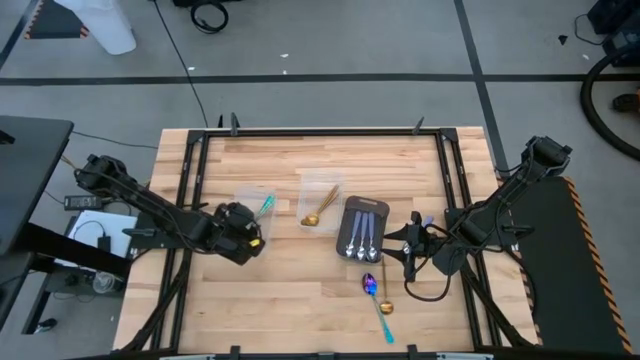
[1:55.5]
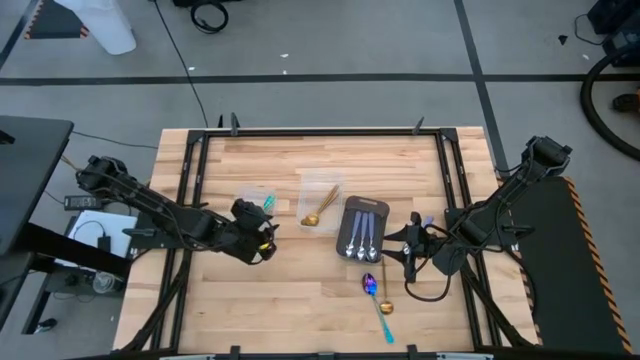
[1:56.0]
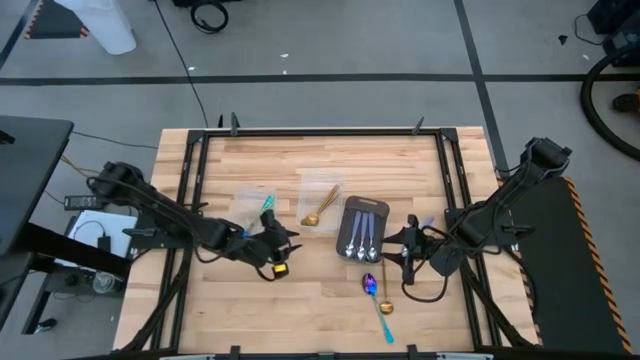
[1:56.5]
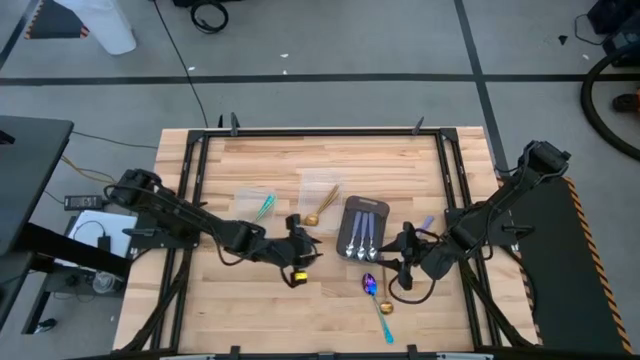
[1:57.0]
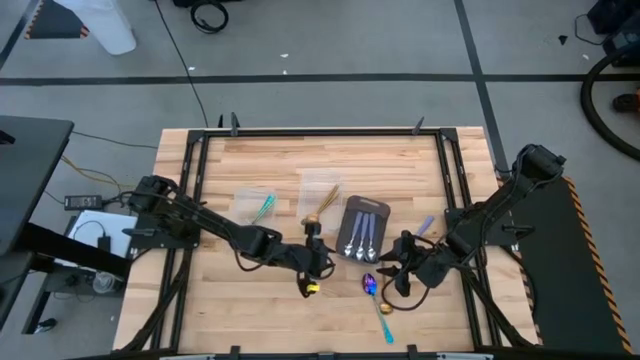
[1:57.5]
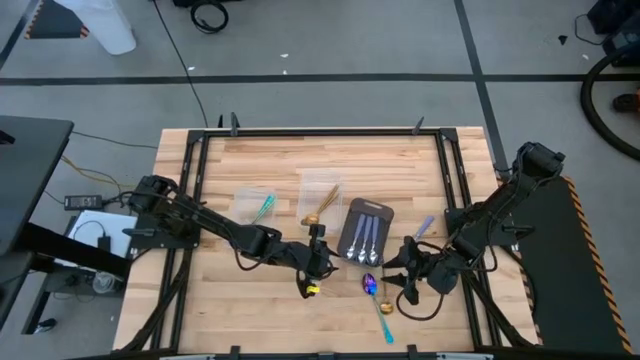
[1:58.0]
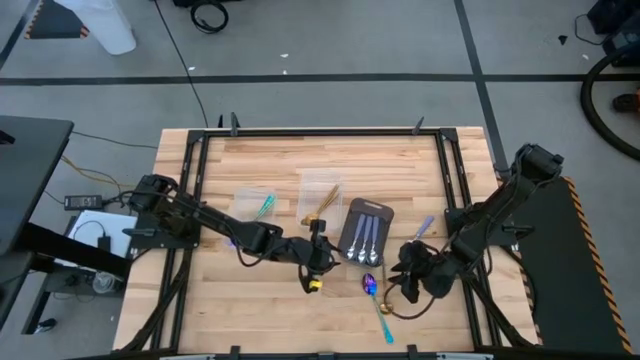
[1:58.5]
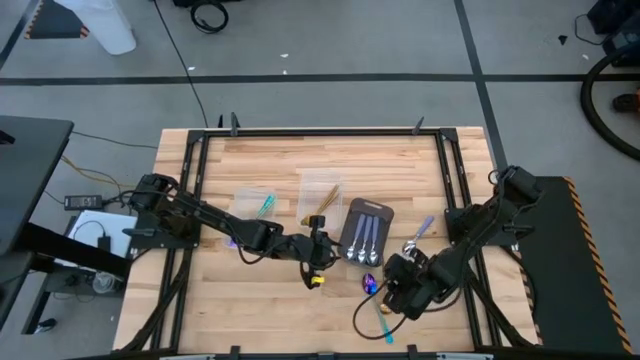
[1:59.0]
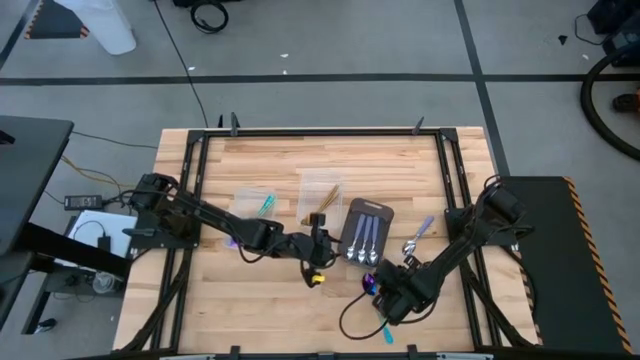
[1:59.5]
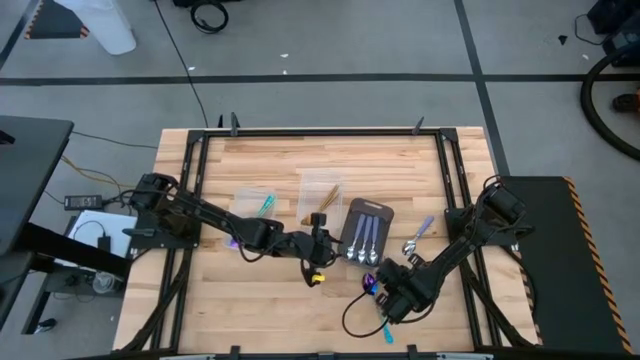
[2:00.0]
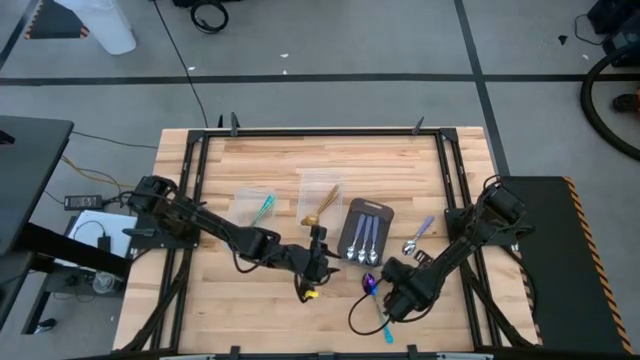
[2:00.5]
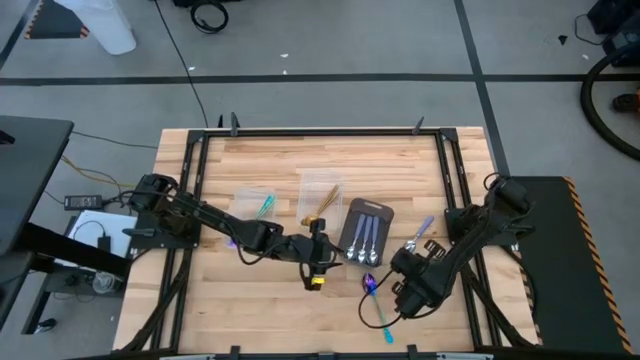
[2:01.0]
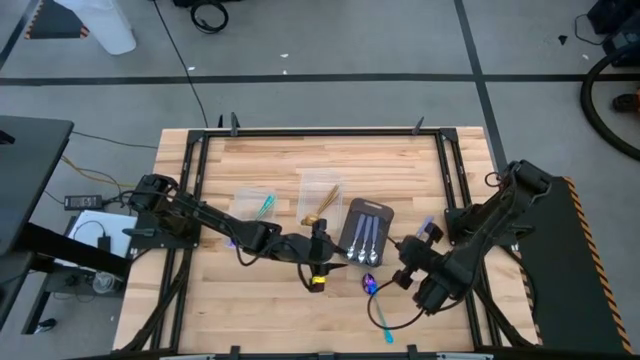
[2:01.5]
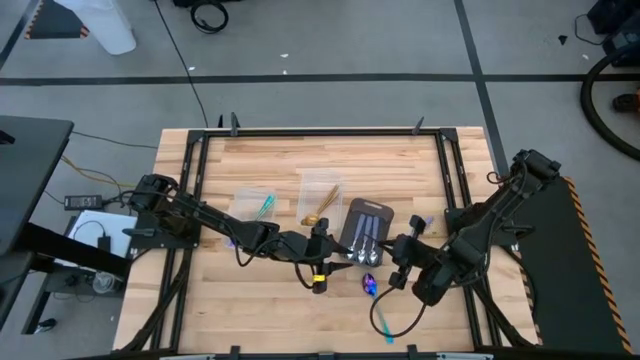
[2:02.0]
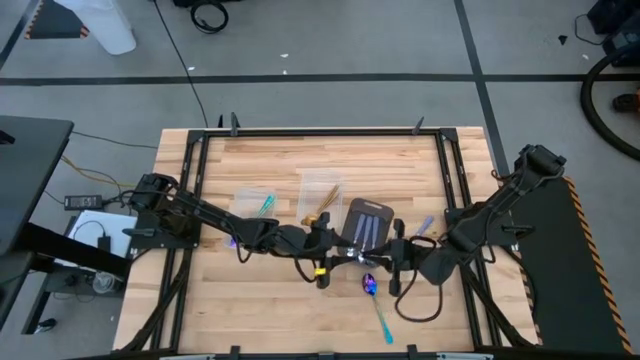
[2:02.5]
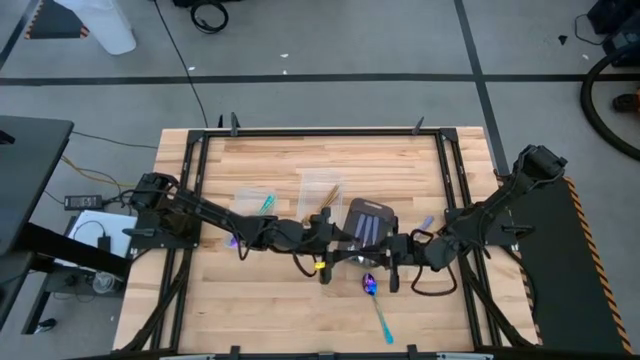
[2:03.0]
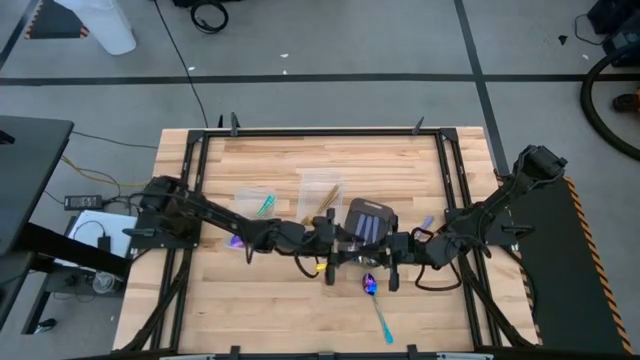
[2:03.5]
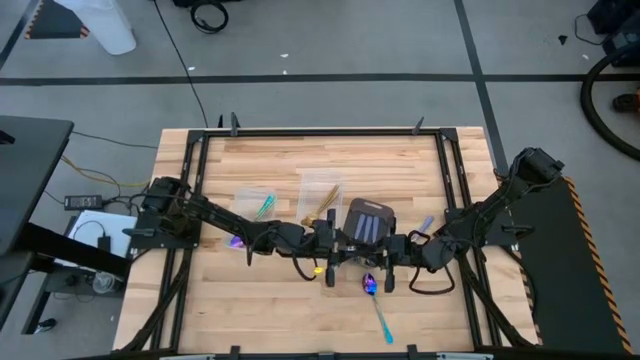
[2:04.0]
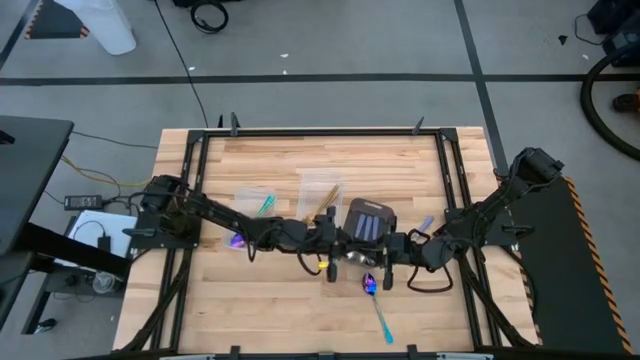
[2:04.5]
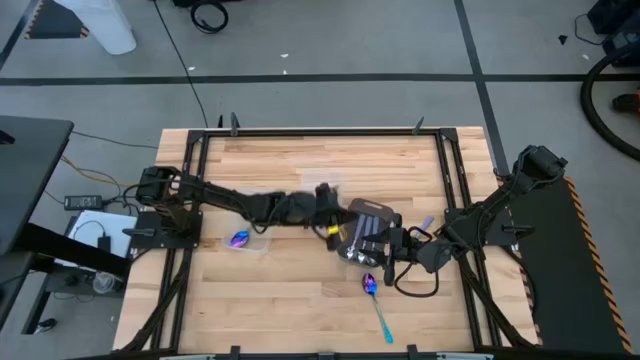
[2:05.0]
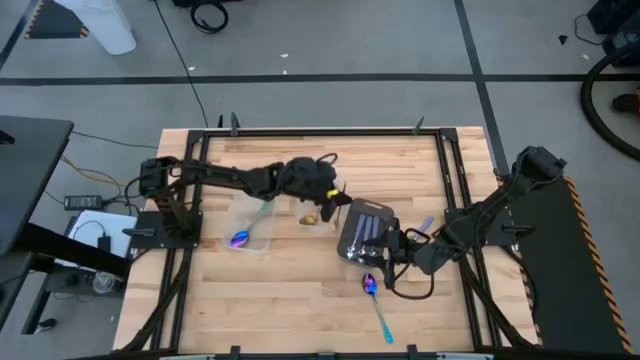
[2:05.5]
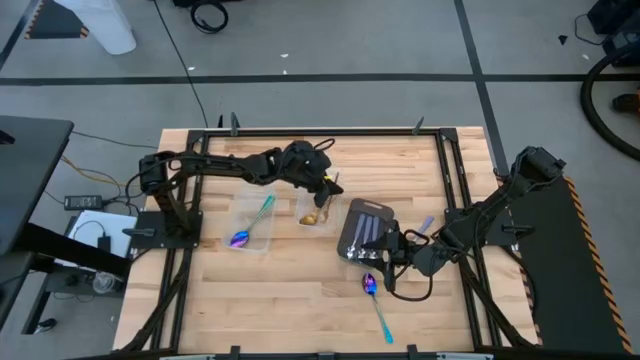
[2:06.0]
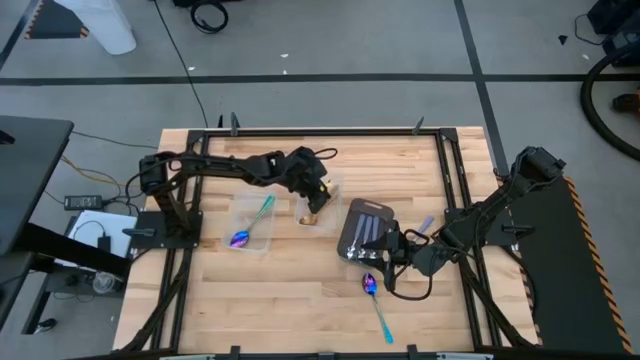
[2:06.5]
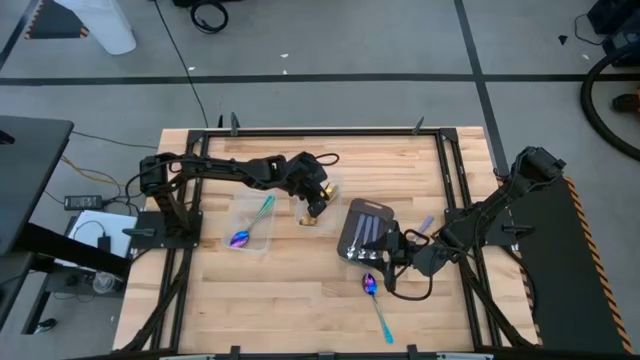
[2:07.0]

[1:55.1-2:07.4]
Task: Sort silverware by color (type)
Put the gold spoon into the right transparent bin

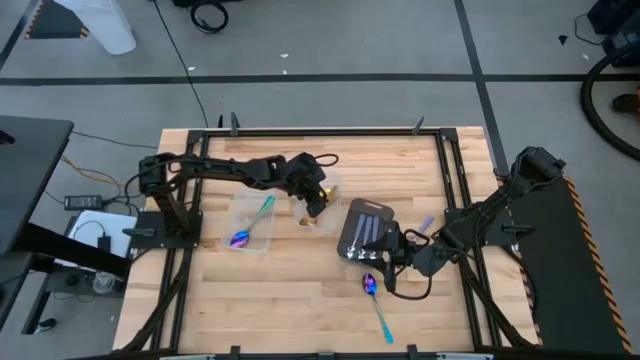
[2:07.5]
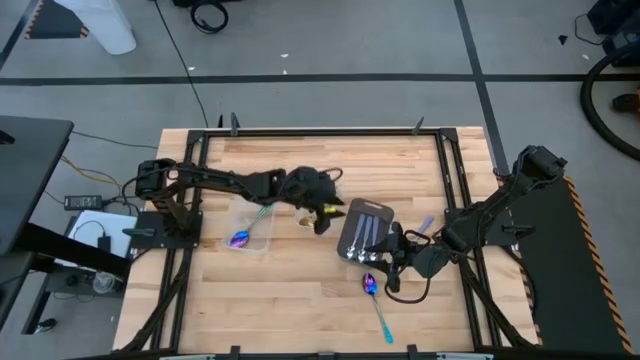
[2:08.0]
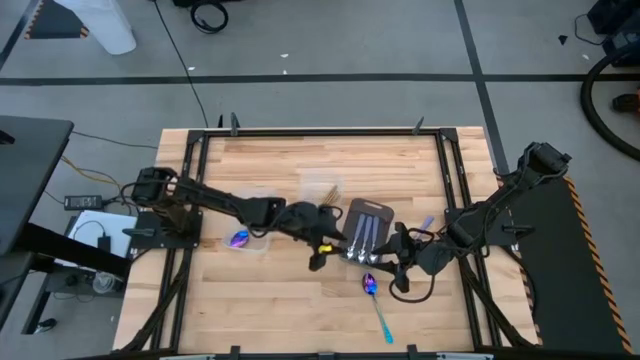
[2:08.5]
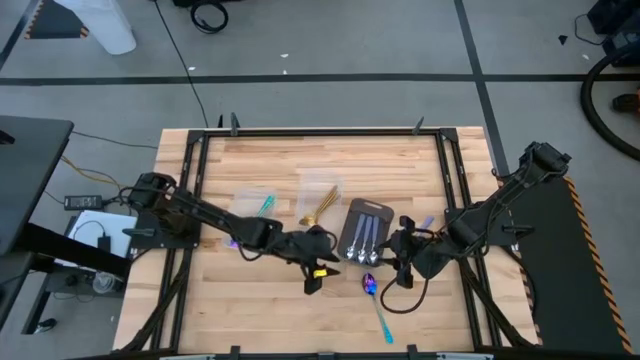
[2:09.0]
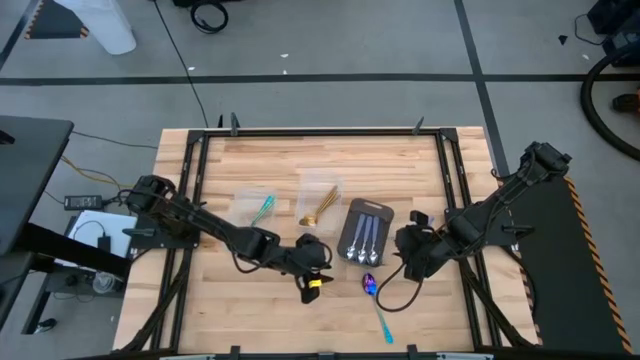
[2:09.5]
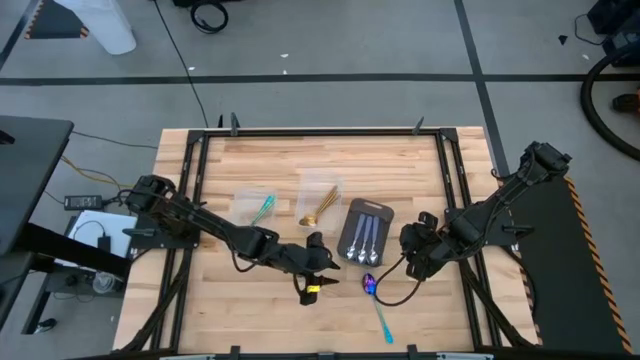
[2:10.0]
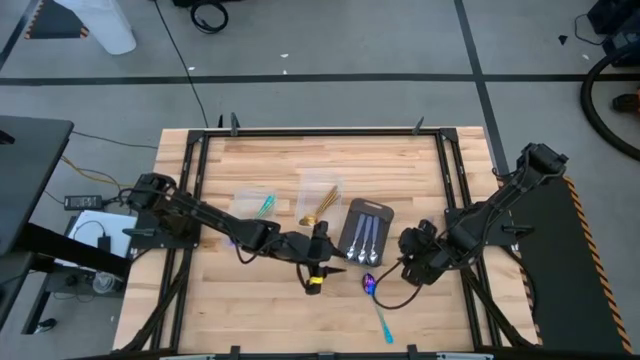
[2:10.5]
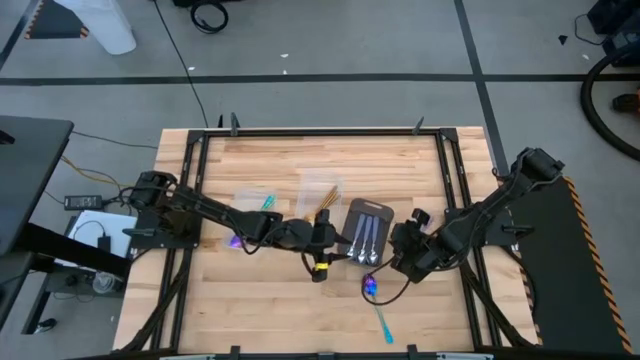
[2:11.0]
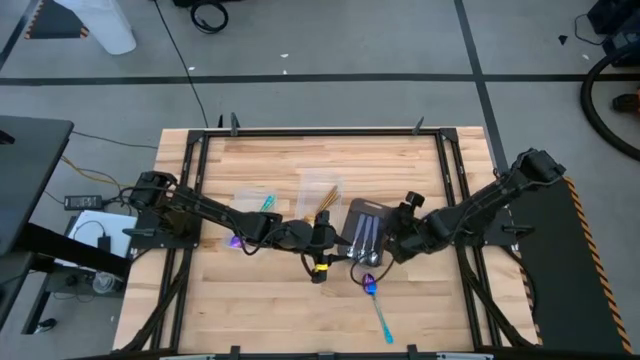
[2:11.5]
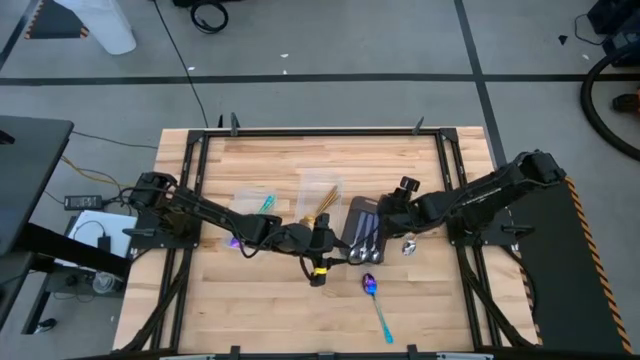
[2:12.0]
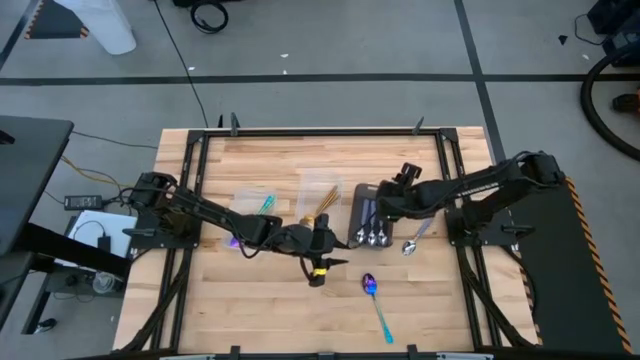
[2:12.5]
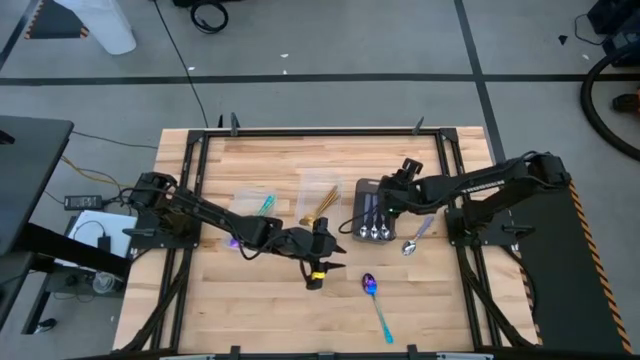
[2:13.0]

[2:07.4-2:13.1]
Adjust the black bin

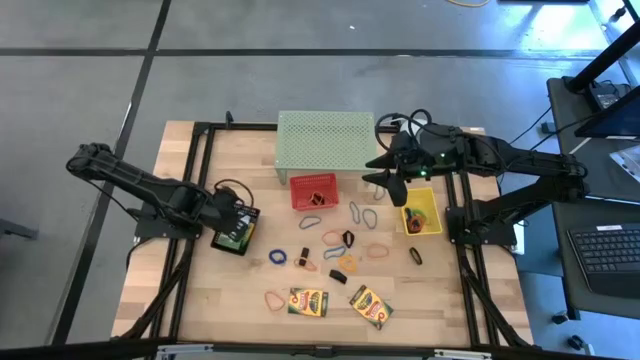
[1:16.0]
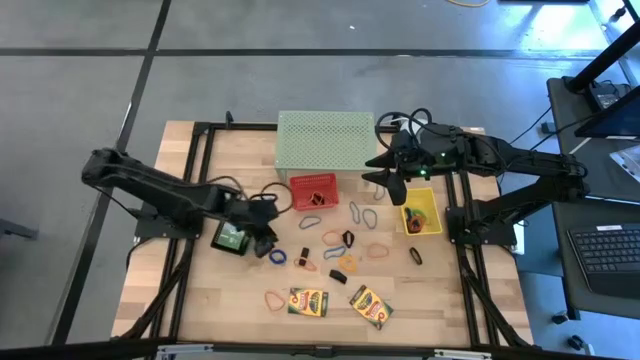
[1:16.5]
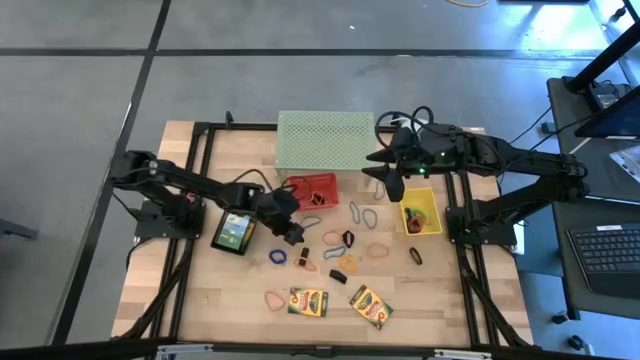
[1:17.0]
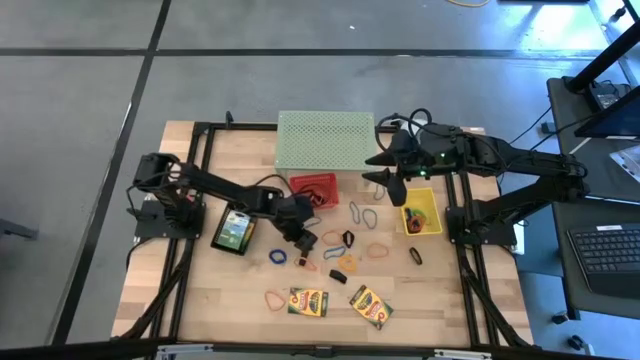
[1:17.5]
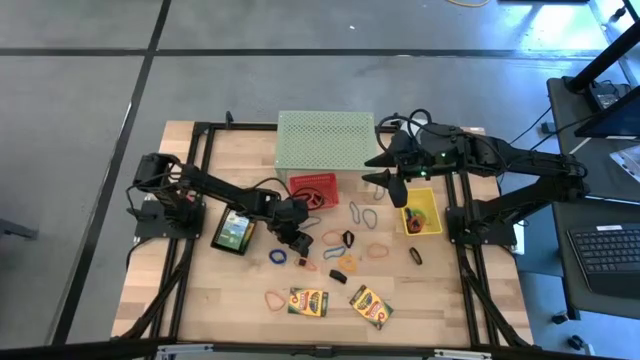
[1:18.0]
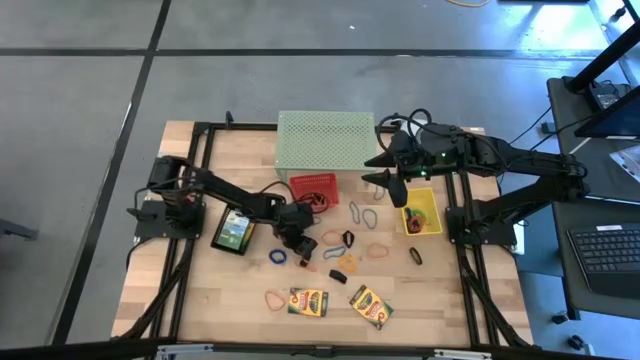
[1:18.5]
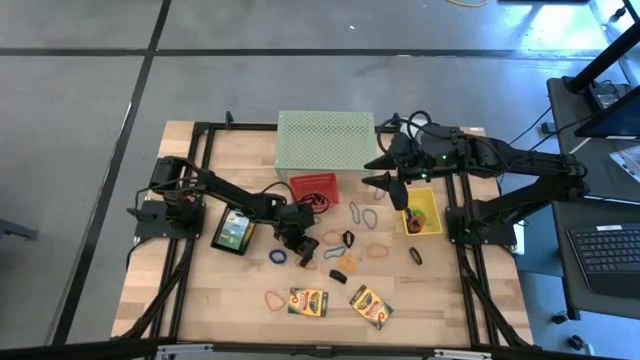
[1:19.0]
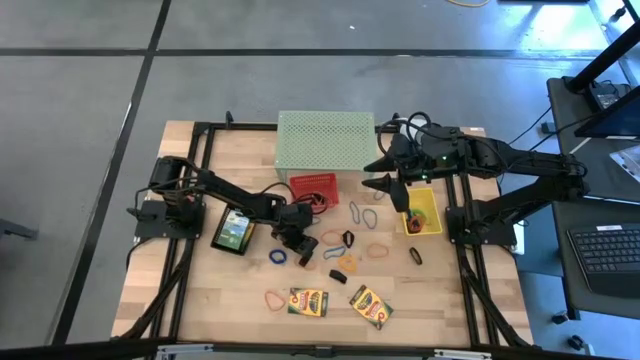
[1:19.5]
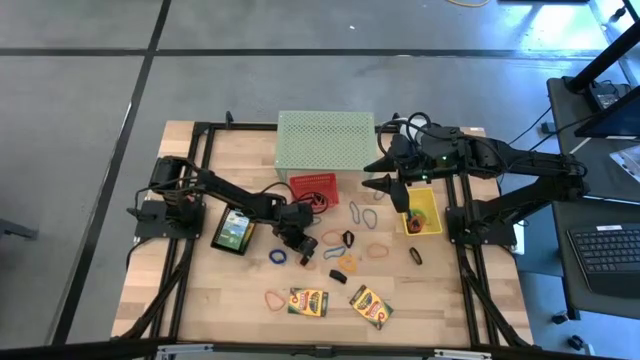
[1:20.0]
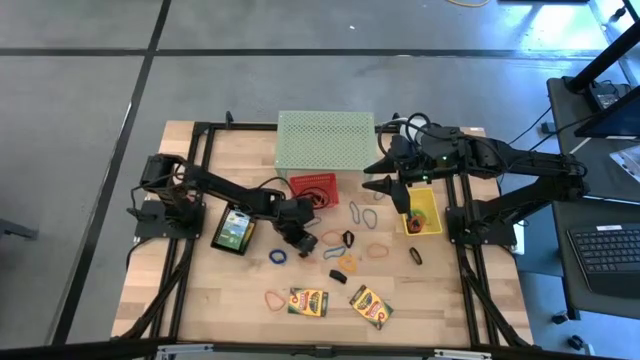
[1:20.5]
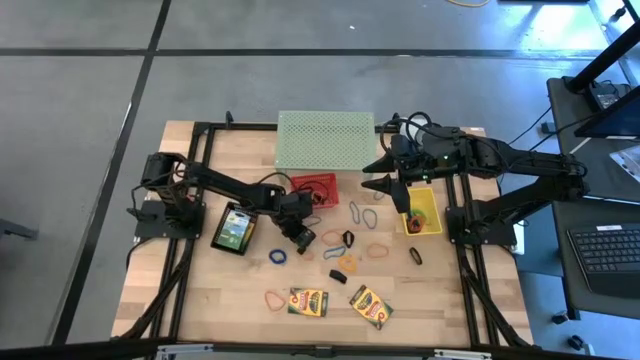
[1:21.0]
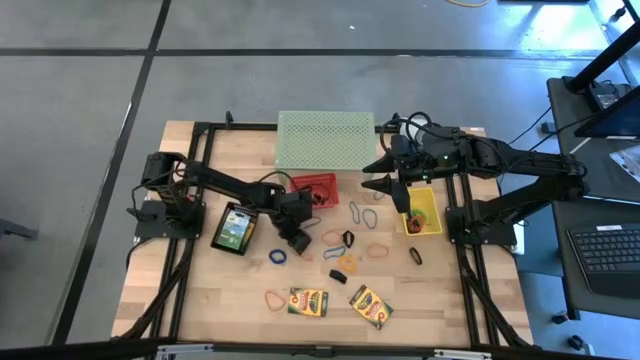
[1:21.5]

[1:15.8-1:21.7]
Task: Pick & Place Office Desk Supplies
Put the orange rubber band into the red bin
